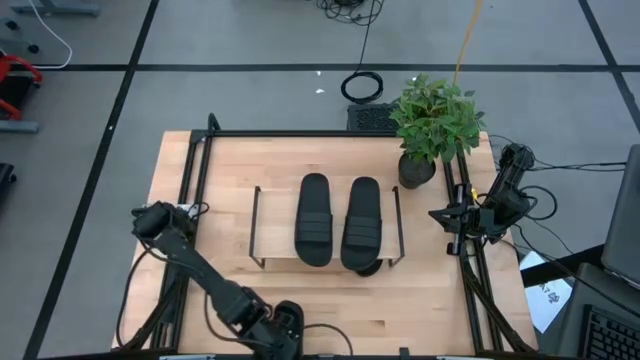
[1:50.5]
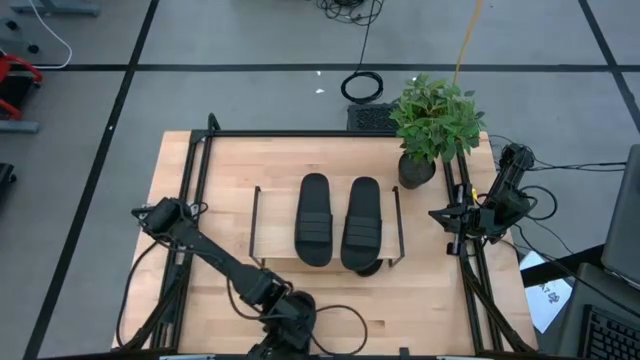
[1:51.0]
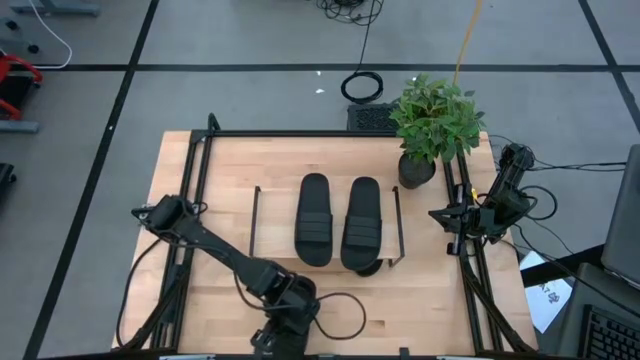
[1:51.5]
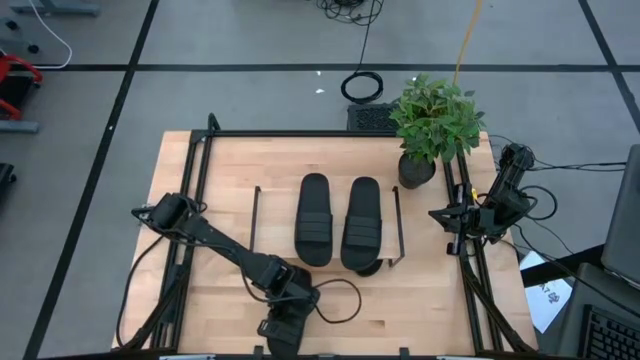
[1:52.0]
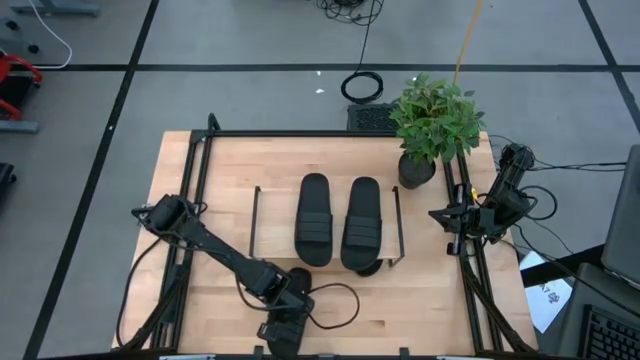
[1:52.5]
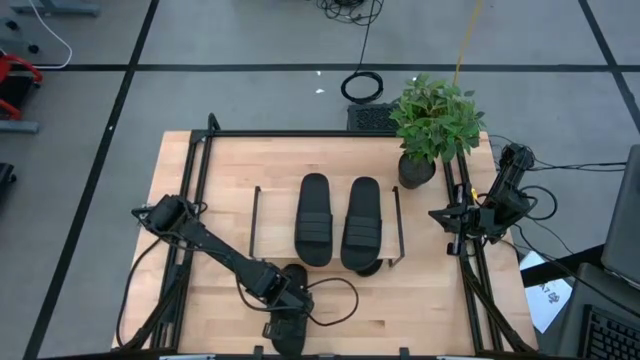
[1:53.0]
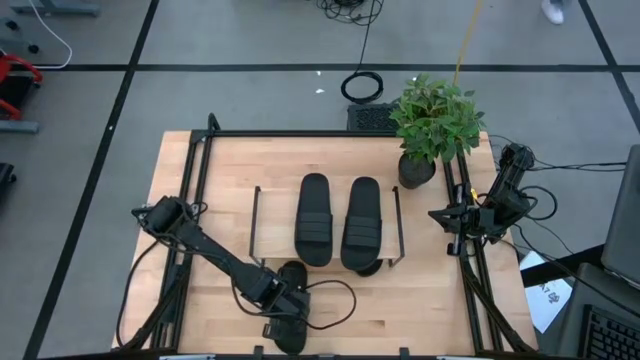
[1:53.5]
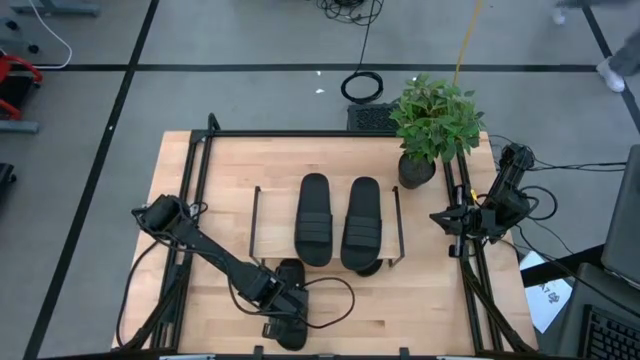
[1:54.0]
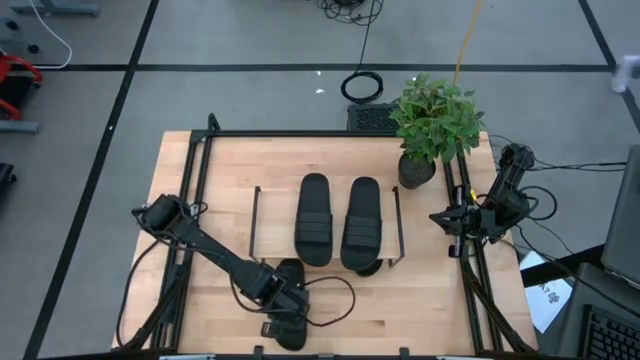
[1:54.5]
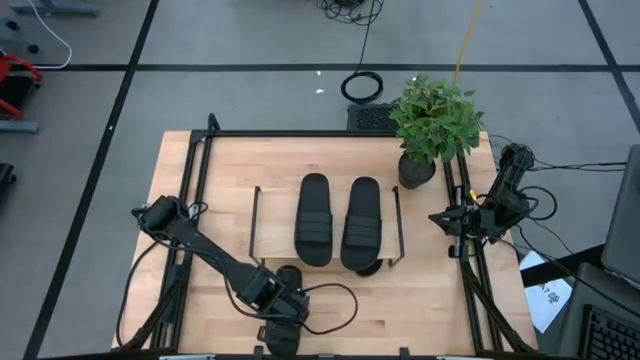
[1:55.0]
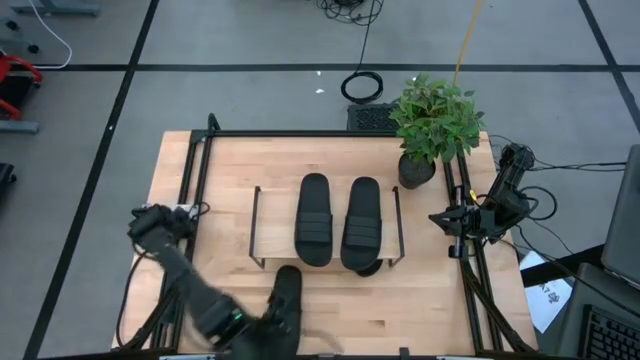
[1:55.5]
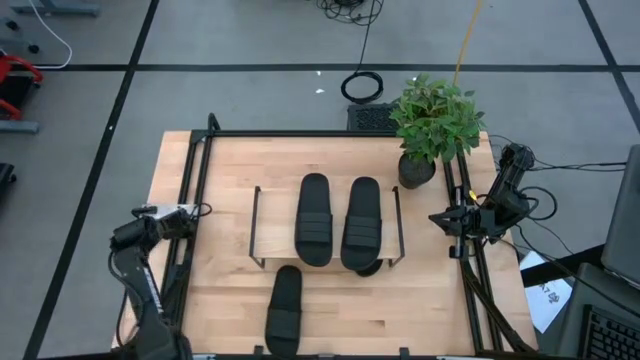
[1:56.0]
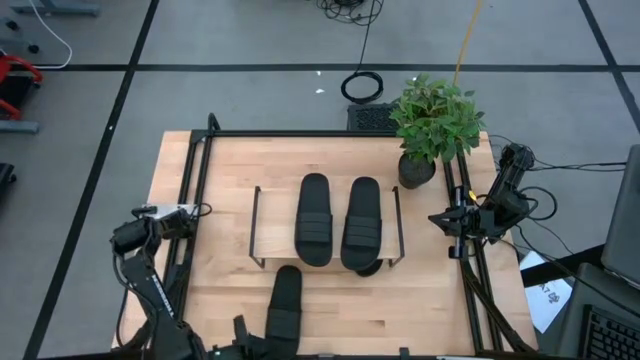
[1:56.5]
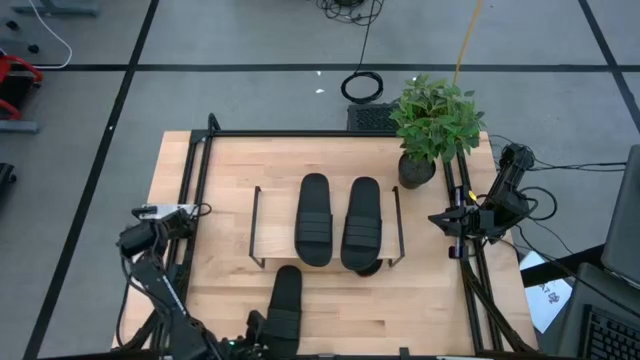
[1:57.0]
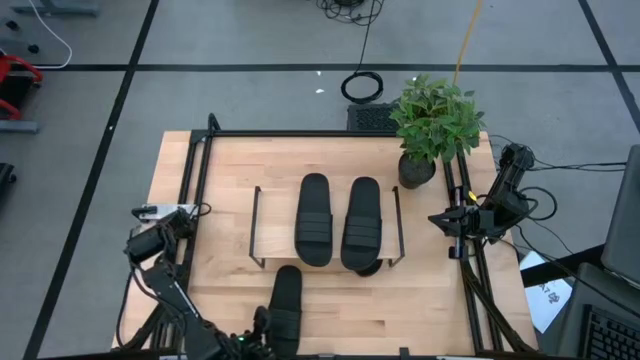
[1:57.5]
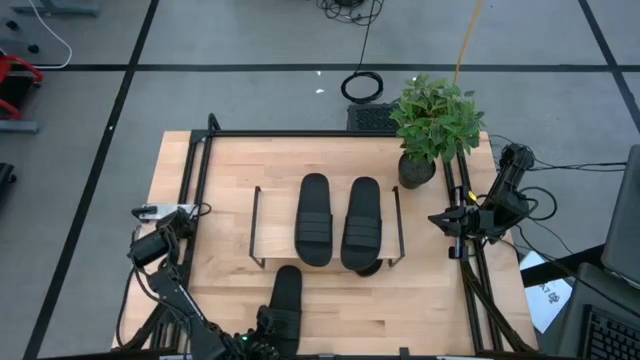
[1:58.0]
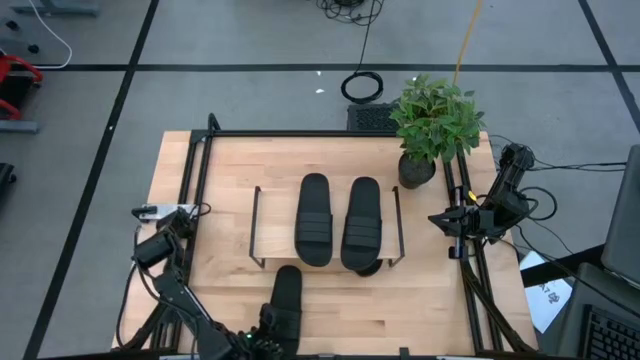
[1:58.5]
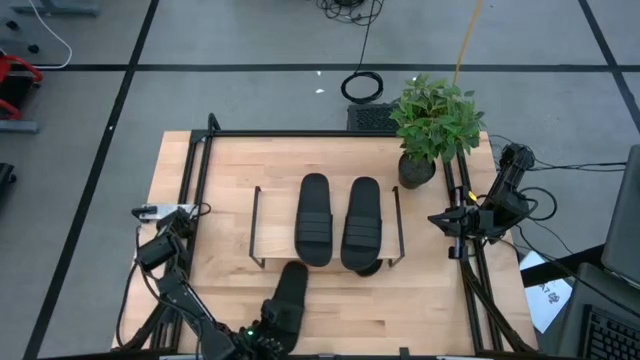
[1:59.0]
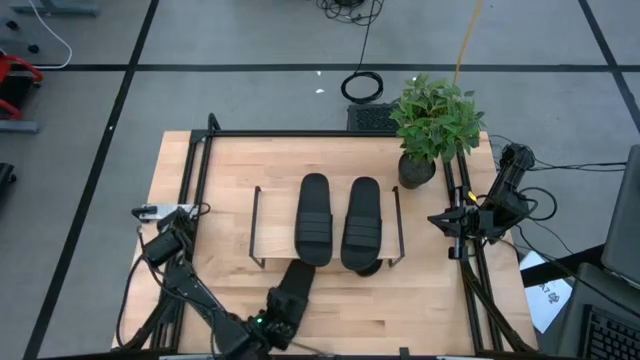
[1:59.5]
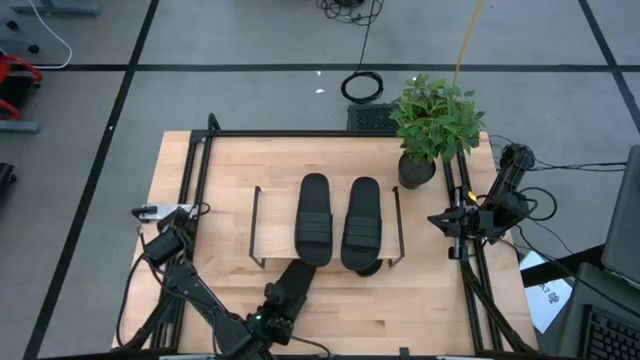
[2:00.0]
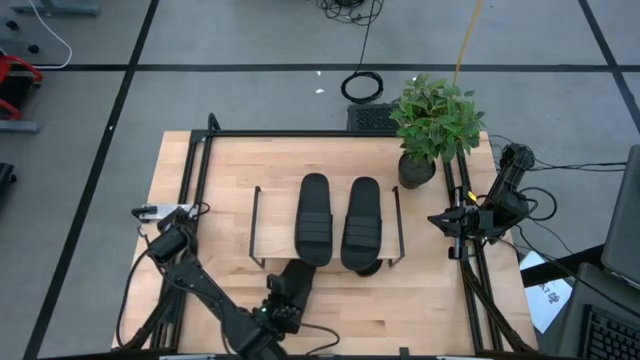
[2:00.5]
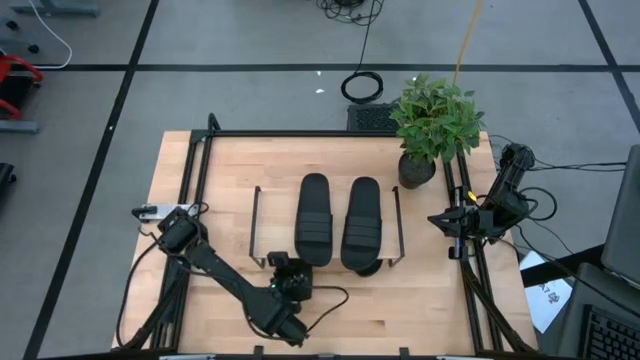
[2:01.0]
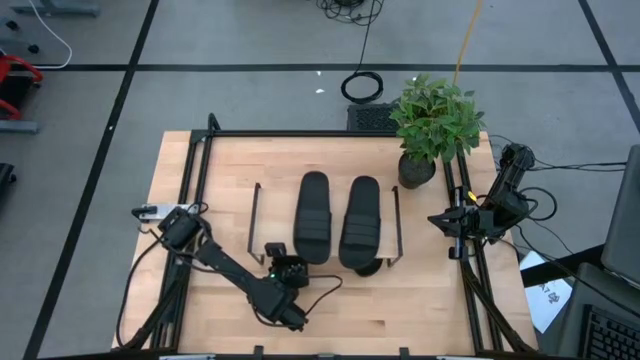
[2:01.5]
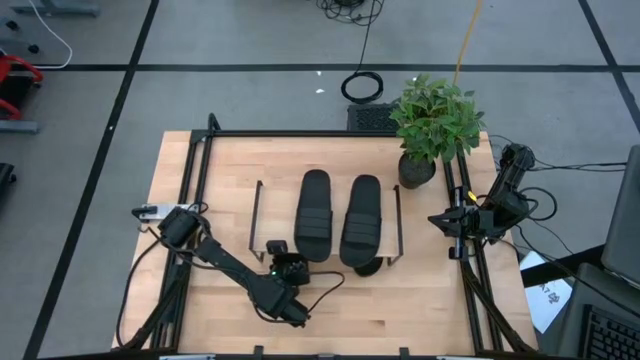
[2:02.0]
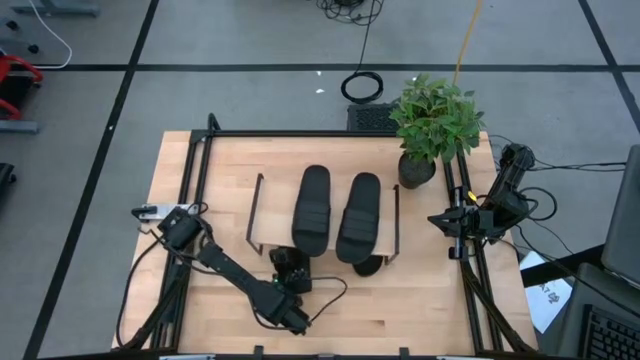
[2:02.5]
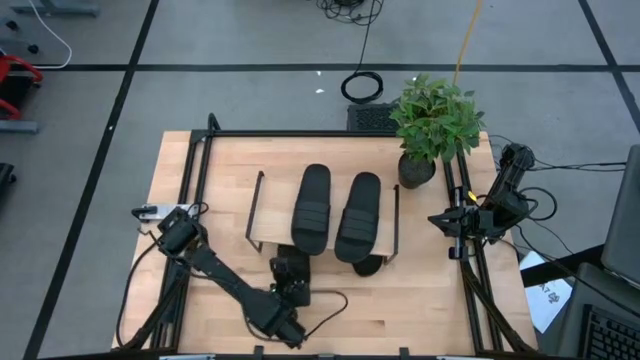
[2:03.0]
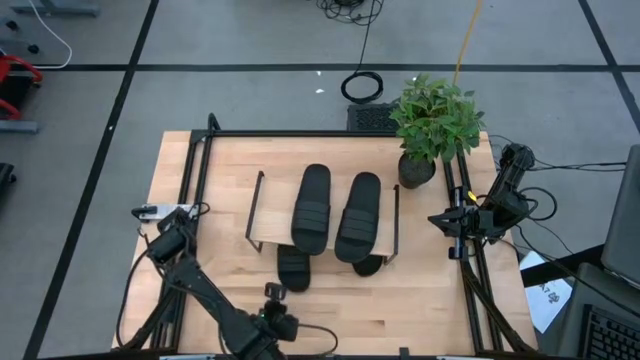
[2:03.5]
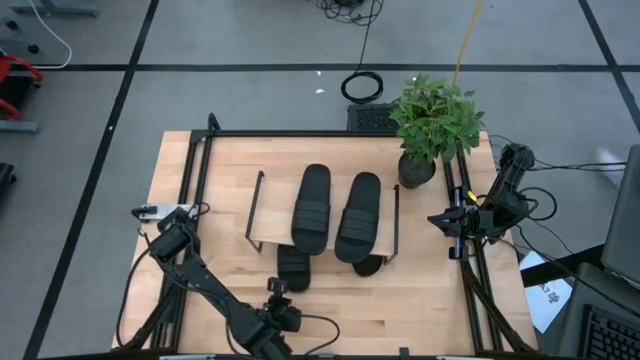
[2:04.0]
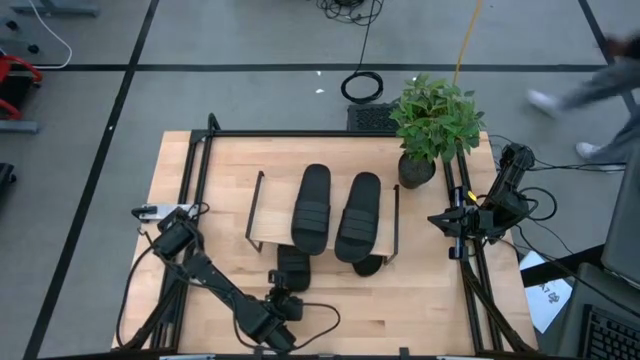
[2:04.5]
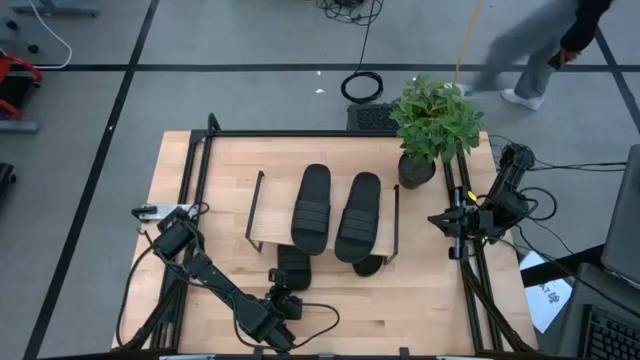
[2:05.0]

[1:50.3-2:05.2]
Task: Pick and place slides into the shelf
Put the black slide under the shelf

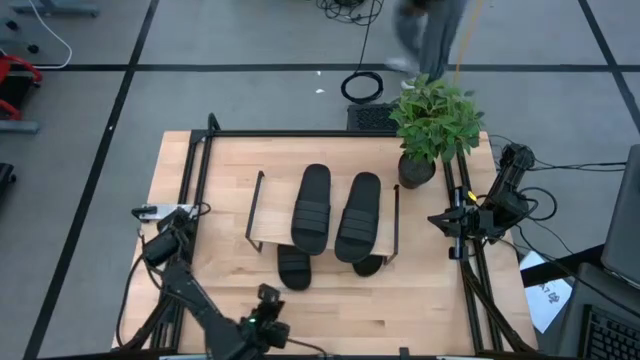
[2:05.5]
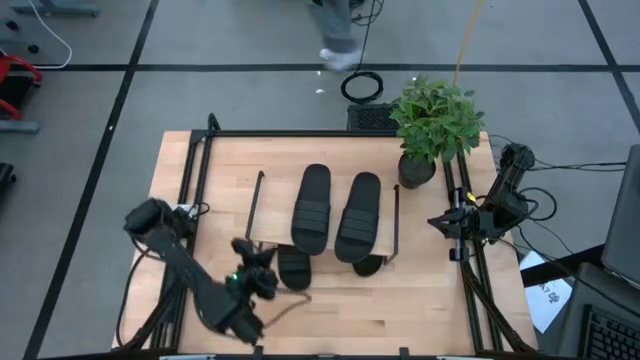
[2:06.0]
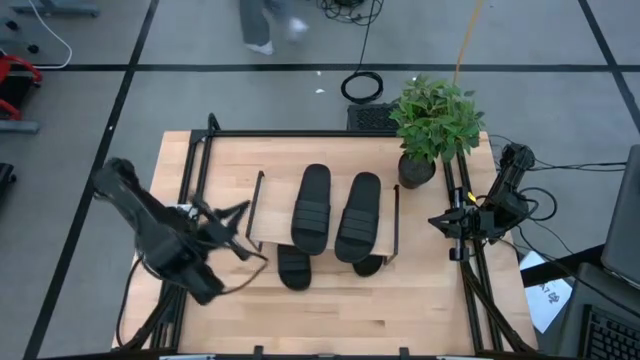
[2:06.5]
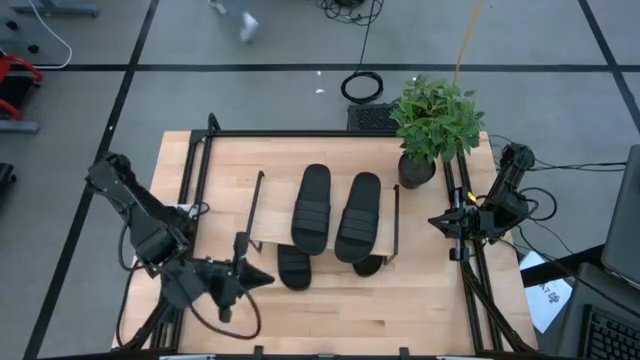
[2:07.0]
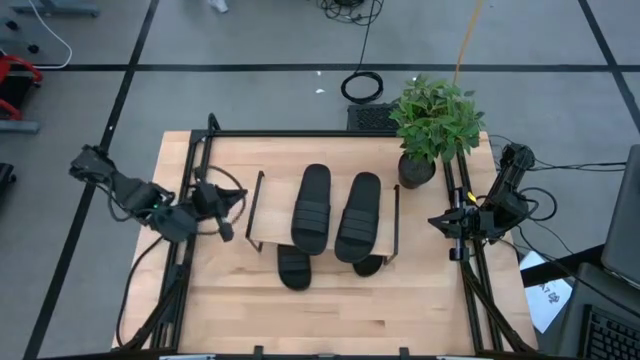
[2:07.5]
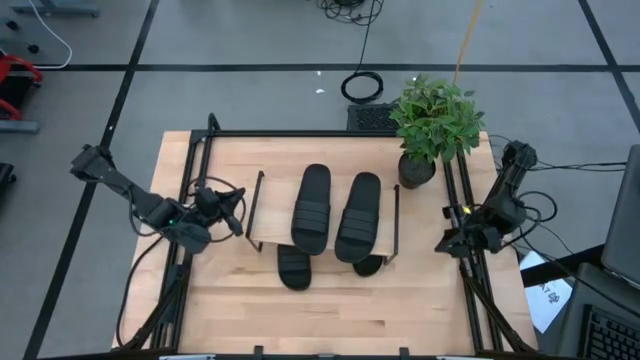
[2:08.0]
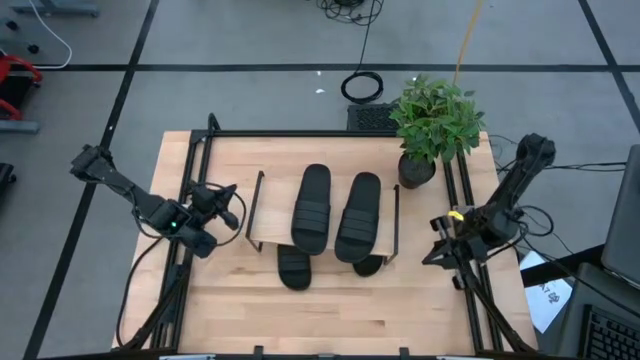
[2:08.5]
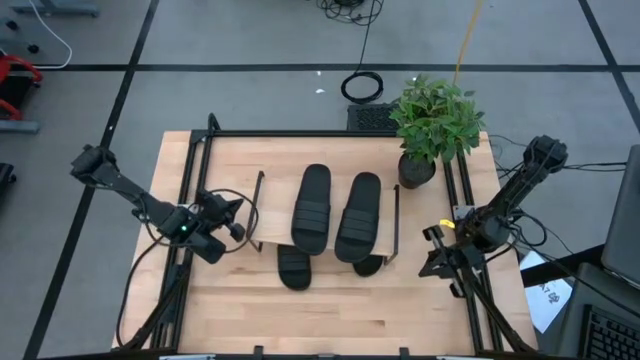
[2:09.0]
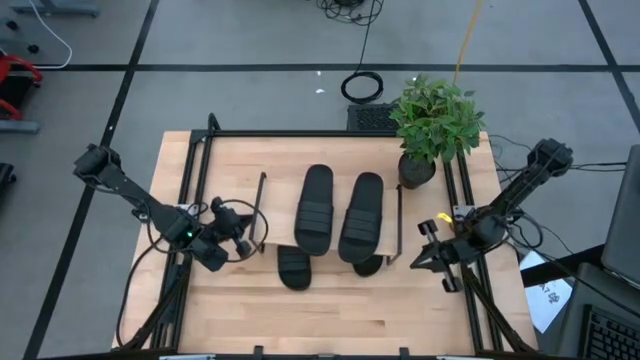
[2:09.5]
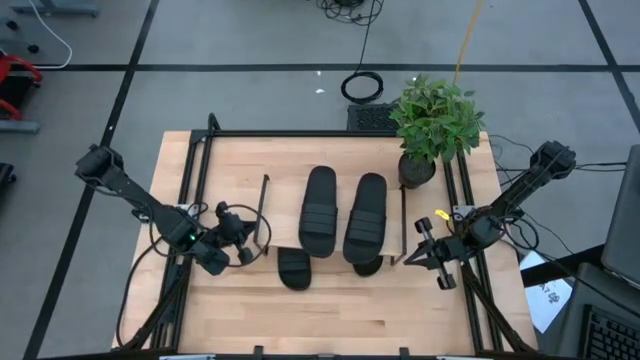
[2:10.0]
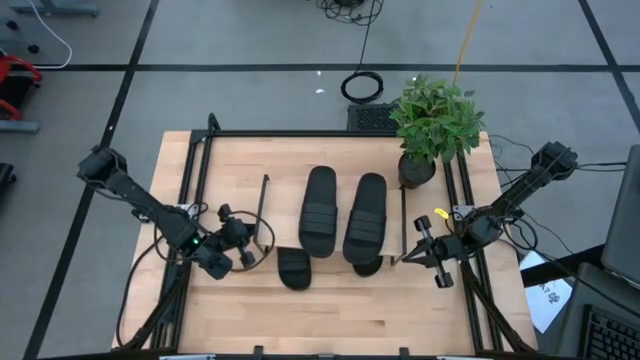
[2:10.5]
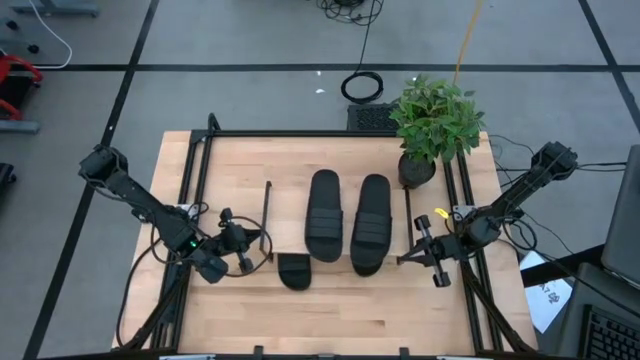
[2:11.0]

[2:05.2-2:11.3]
Adjust the shelf
